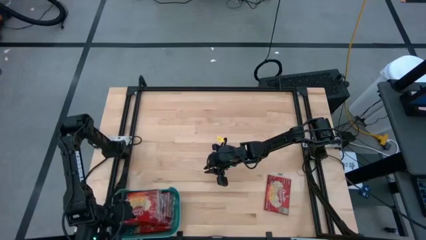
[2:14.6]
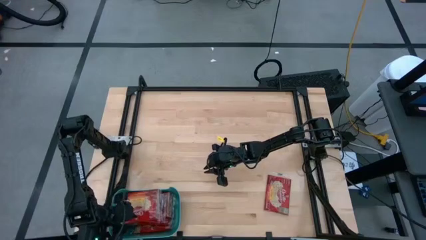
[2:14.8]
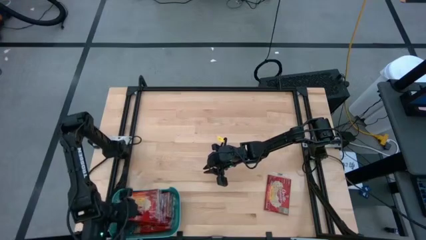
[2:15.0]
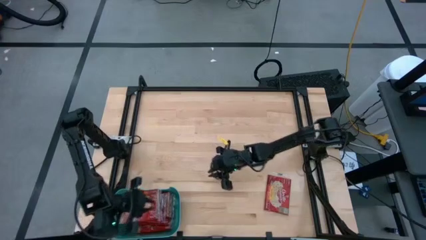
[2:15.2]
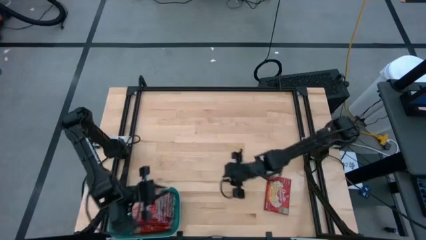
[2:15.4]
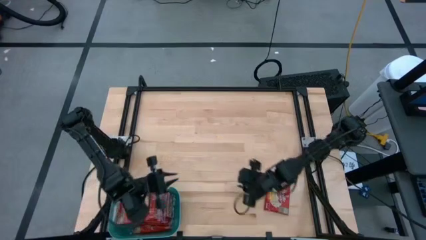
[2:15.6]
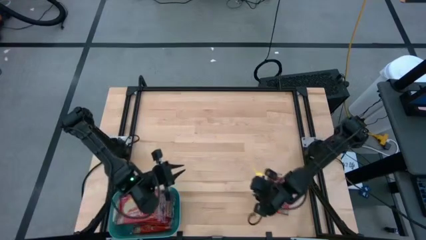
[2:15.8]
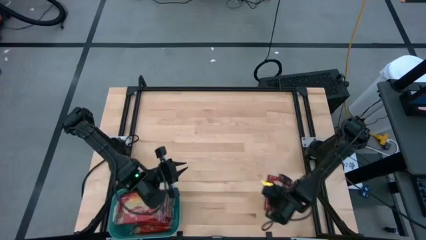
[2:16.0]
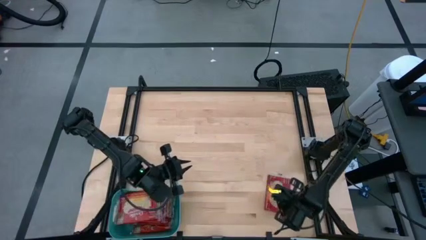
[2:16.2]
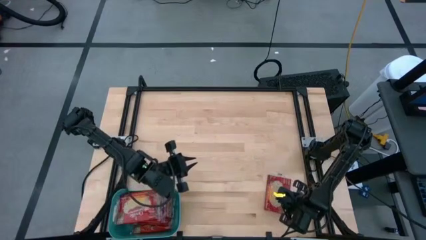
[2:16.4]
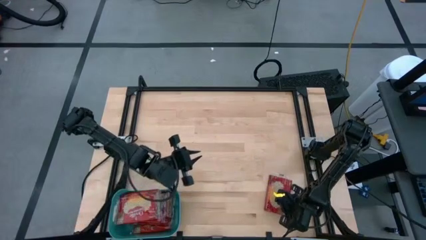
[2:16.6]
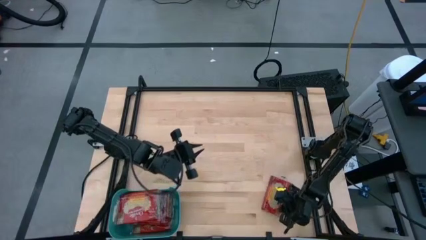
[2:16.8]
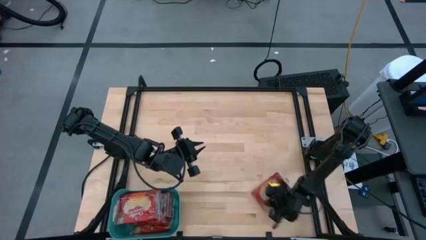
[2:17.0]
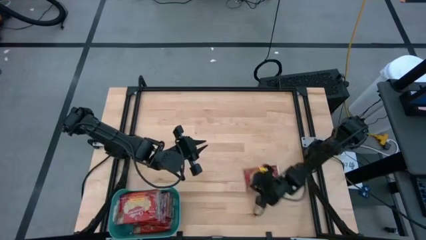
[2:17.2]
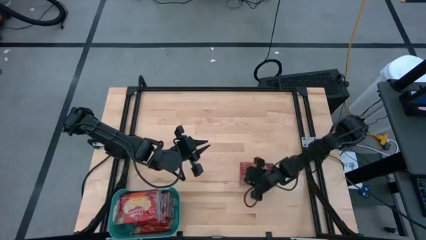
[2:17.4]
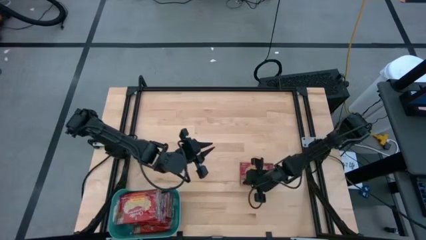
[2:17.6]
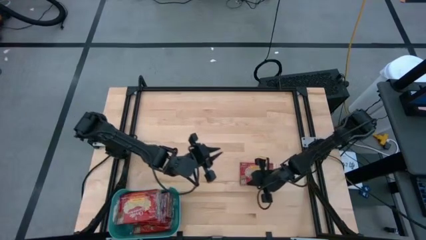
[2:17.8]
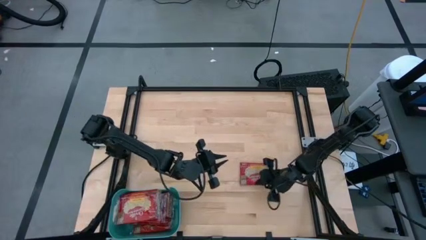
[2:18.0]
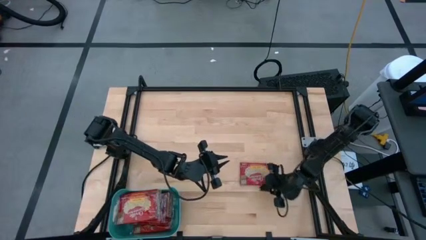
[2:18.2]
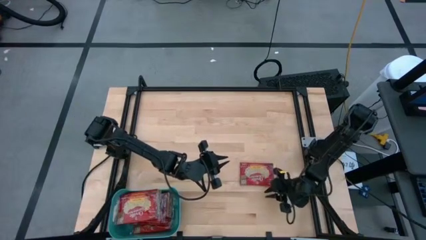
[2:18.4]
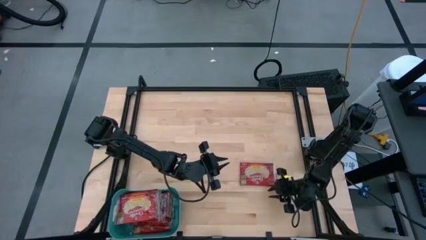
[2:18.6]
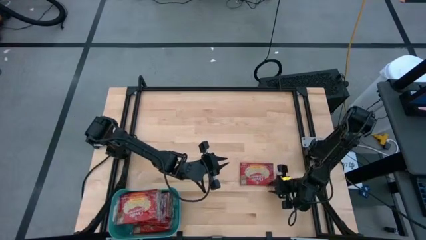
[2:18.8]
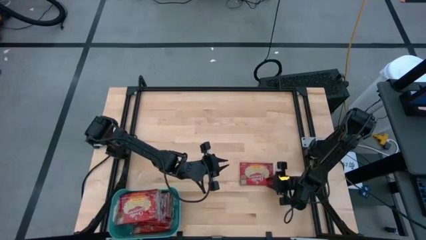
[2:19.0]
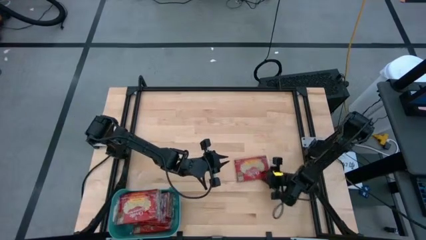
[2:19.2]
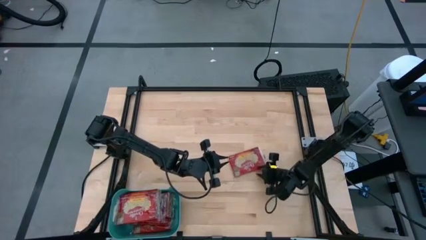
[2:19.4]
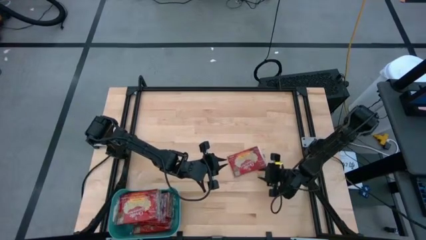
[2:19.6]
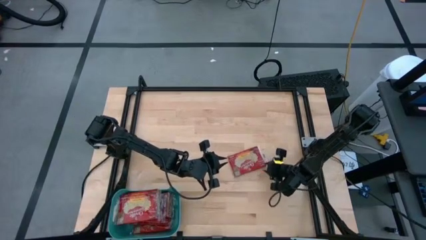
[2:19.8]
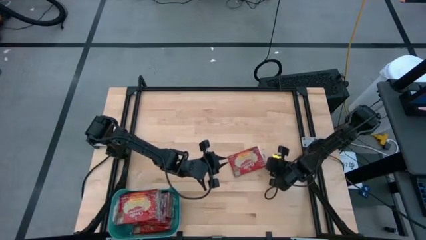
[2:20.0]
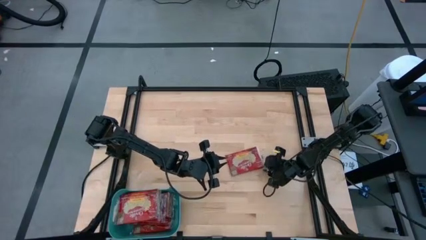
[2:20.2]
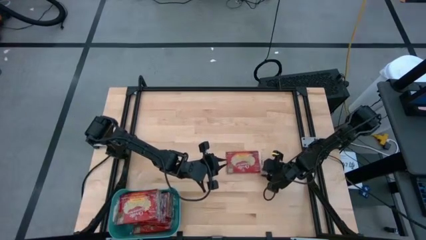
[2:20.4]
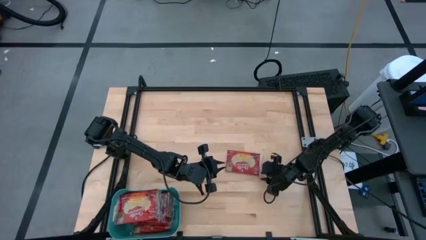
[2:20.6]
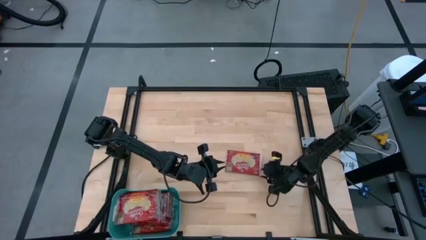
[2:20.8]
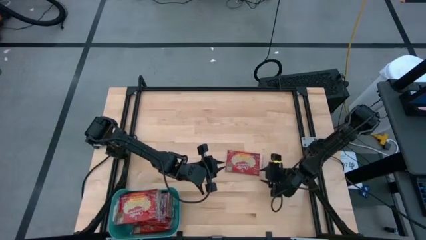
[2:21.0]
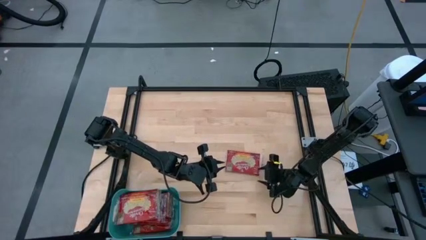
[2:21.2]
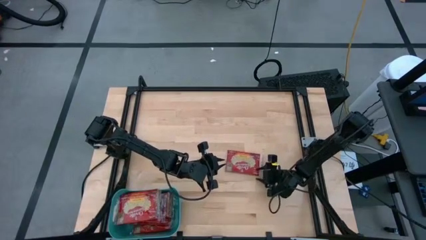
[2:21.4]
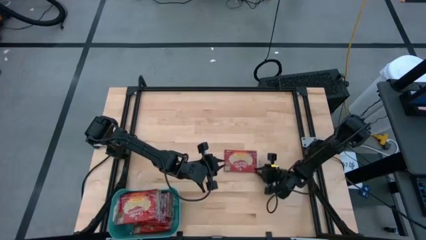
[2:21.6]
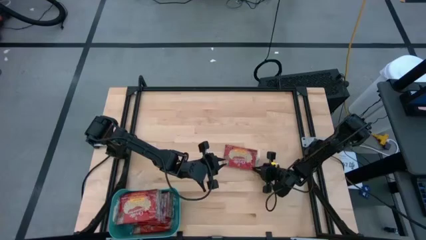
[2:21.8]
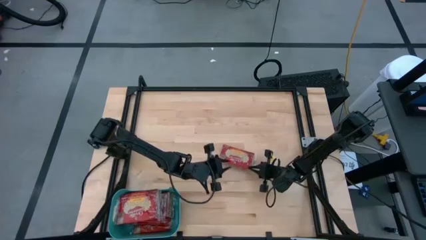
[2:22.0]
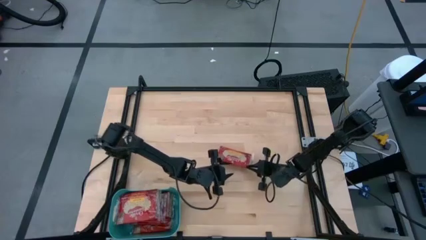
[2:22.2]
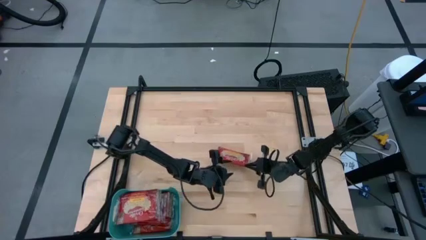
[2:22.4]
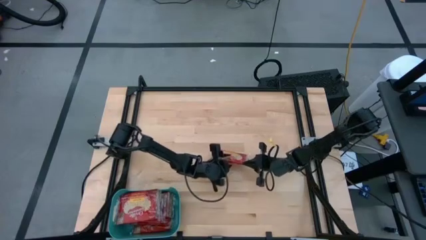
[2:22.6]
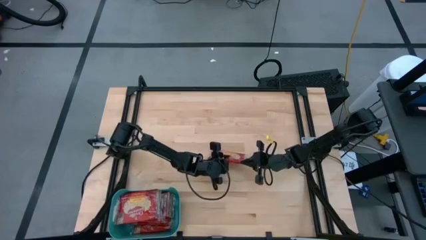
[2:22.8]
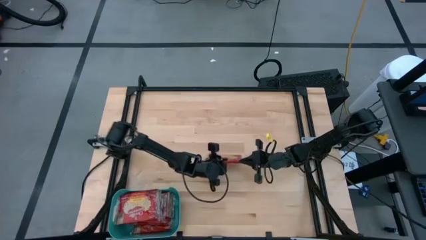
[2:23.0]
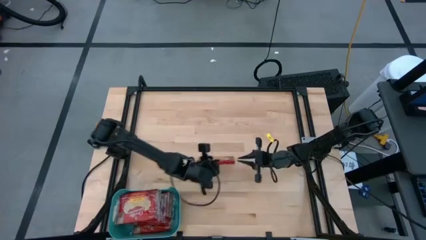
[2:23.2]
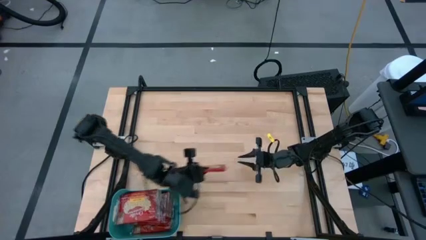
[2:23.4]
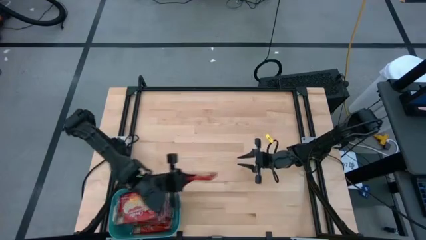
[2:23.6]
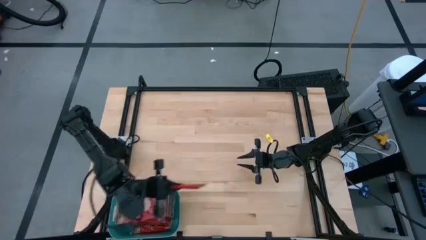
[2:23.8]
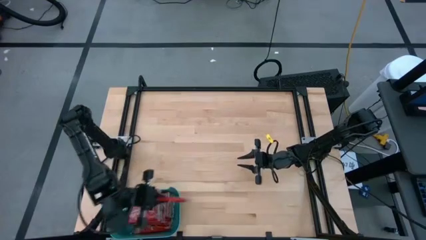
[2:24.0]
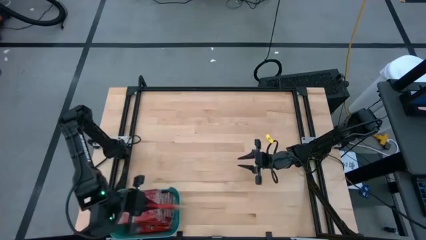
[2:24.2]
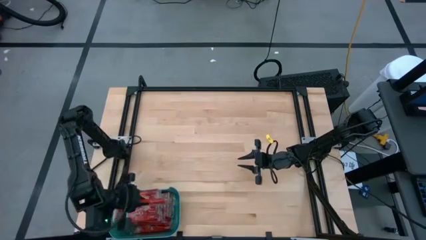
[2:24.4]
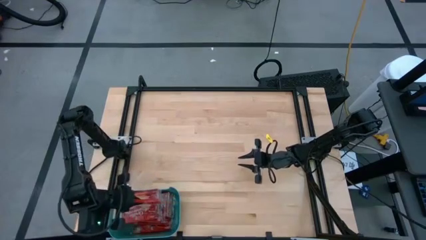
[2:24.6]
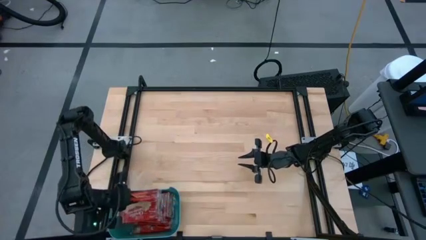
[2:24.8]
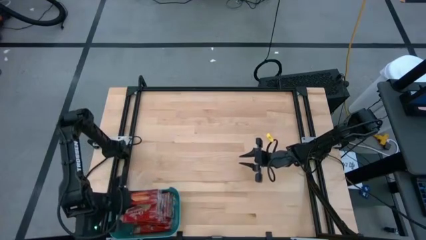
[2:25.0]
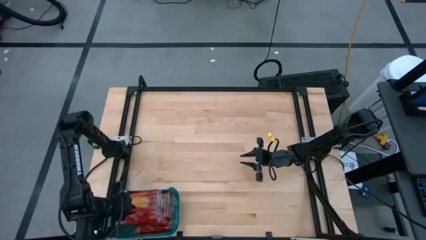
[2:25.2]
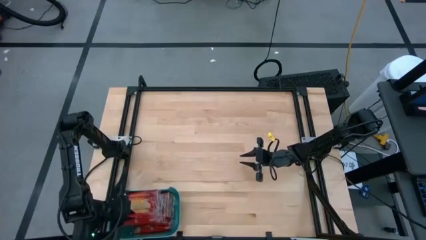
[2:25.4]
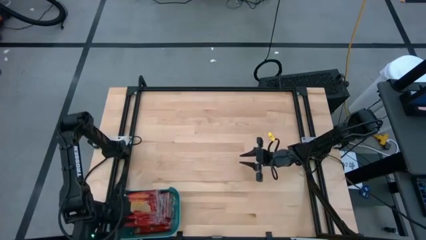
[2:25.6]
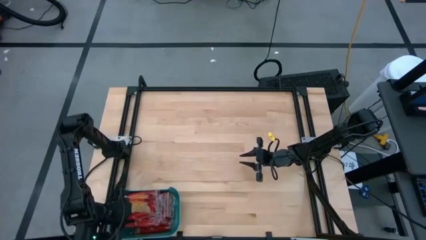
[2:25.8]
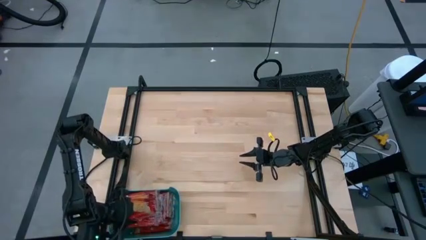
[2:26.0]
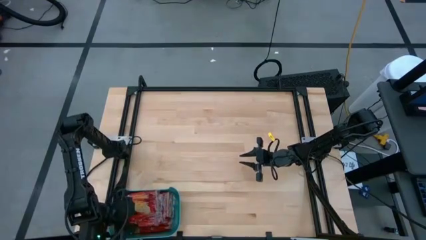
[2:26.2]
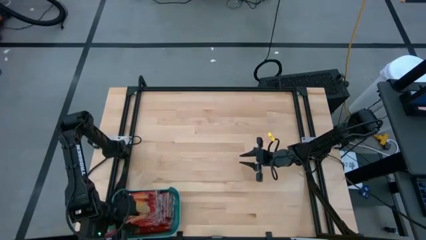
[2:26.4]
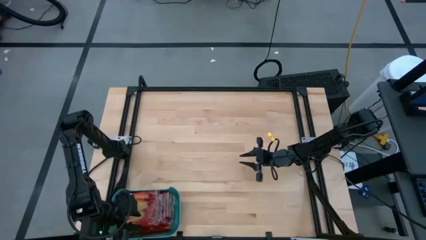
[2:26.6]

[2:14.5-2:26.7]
Task: Sort popcorn bags into baskets
Put the red popcorn bag into the blue container

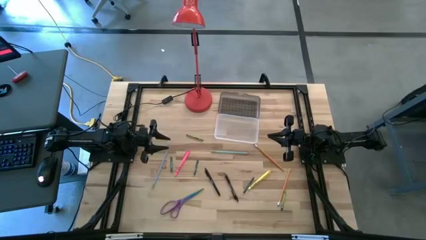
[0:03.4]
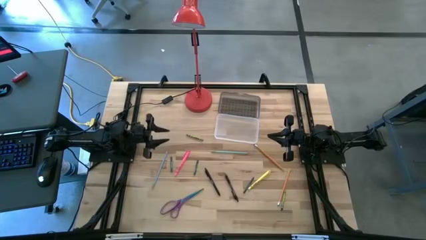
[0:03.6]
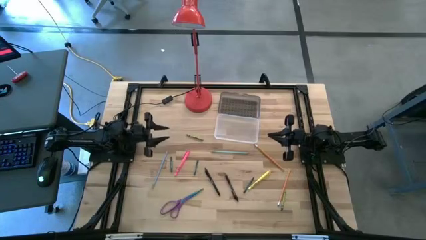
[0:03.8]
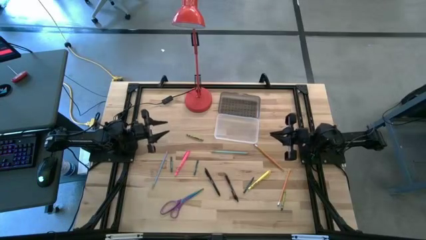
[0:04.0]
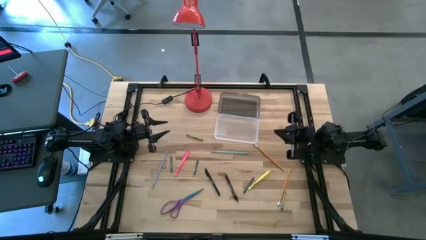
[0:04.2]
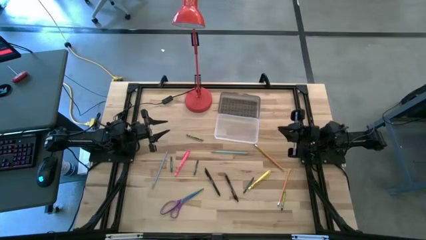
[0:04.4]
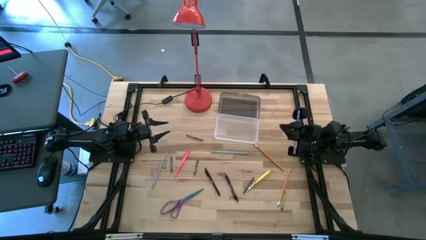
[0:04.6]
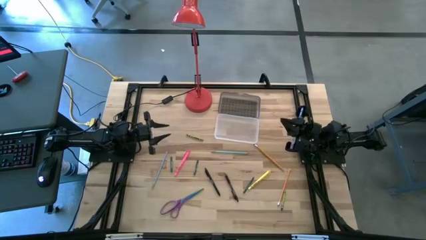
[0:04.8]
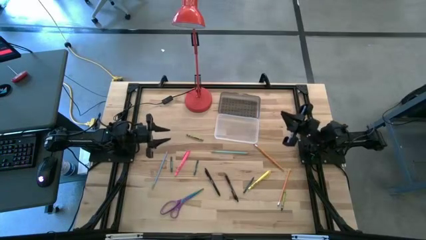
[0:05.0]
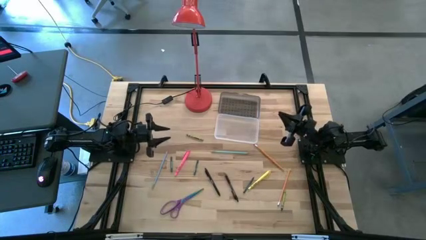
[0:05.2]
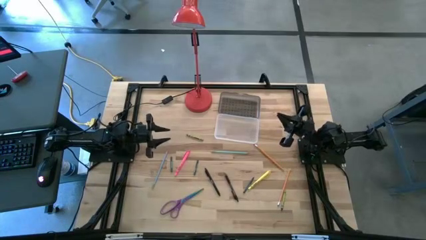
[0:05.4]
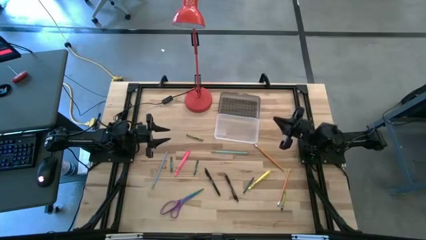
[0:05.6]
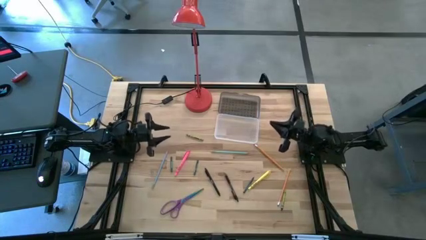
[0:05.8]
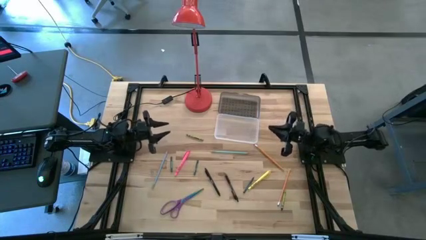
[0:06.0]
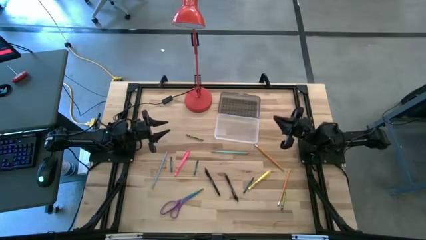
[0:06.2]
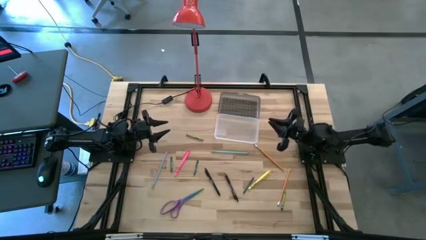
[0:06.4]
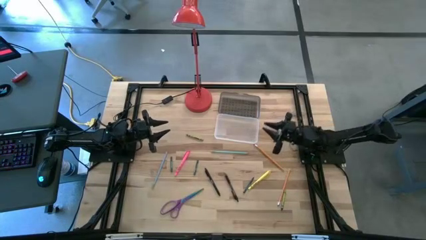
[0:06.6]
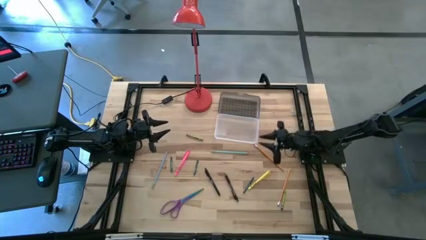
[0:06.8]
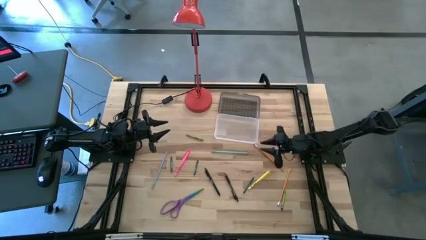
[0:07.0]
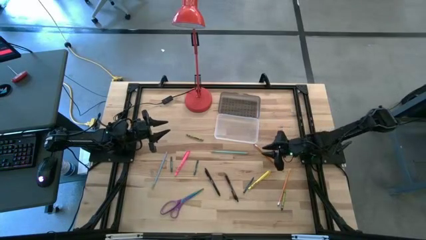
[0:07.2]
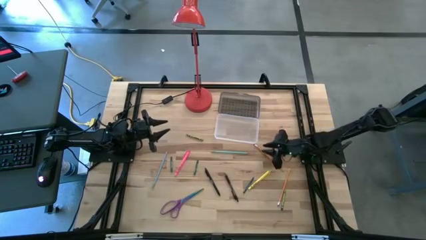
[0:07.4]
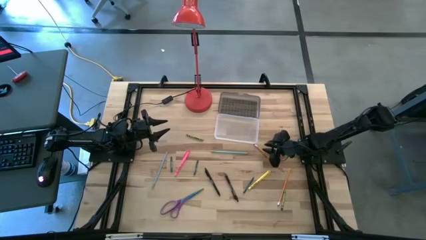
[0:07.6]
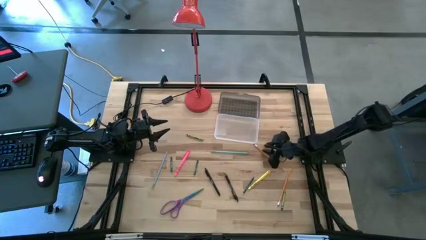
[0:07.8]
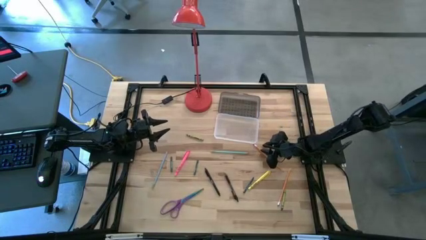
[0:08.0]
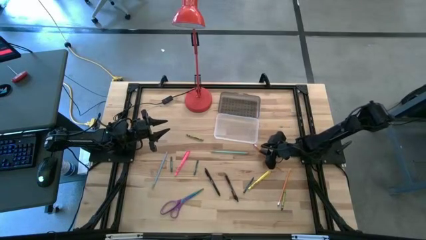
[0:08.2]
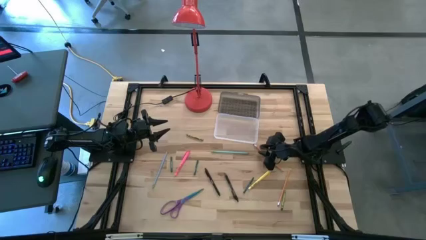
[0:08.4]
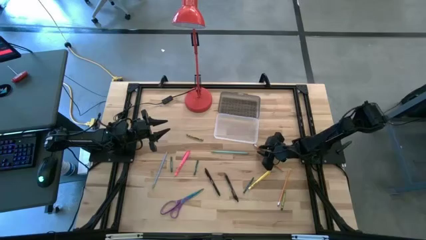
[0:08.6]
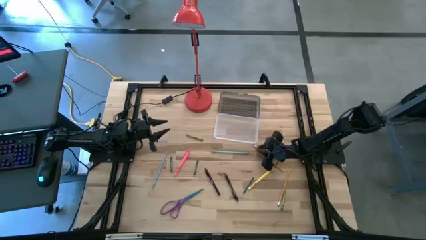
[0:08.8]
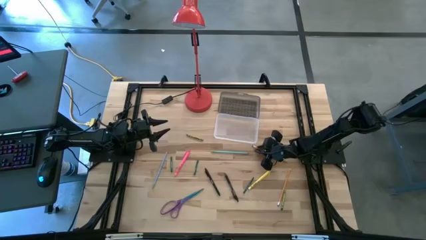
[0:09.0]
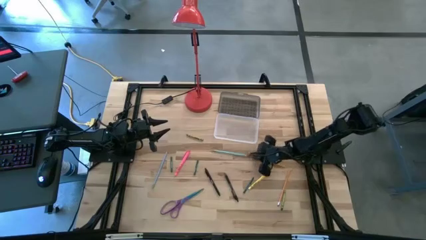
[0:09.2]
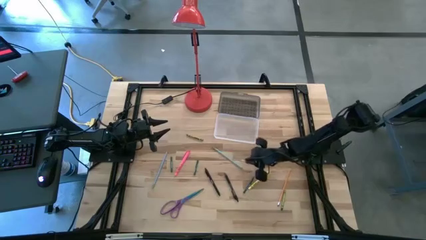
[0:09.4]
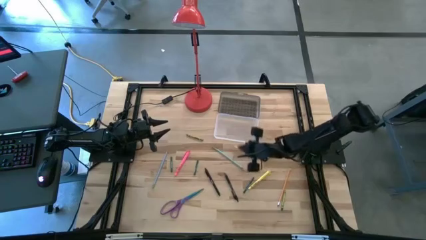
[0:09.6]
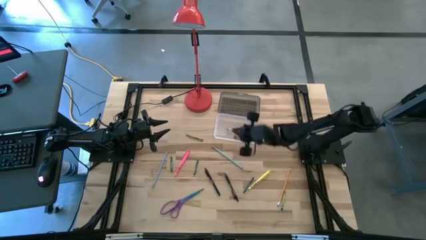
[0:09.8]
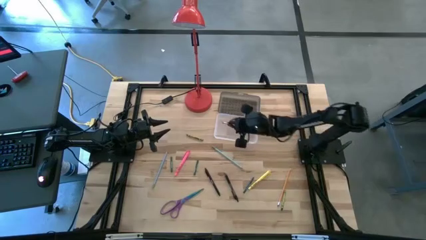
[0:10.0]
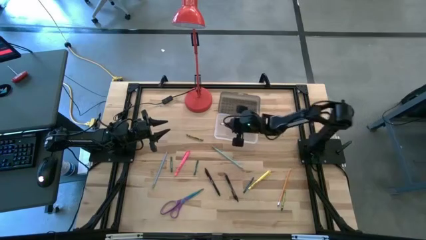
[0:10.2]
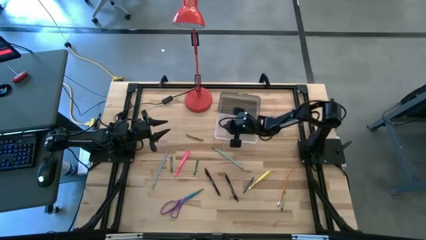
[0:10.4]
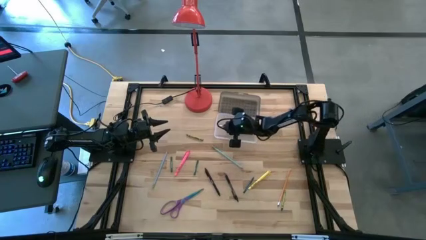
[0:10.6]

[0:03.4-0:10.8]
Task: Pick & place school supplies into a supply box
Put the top orange pencil into the black supply box
